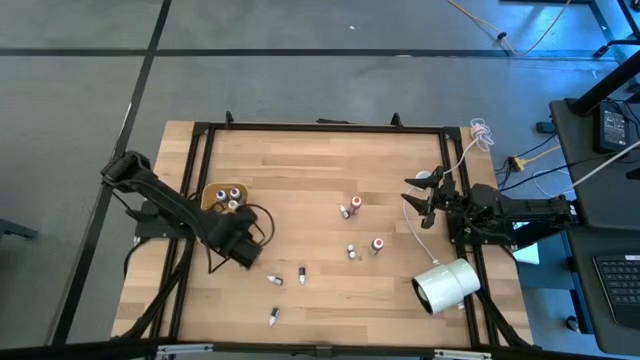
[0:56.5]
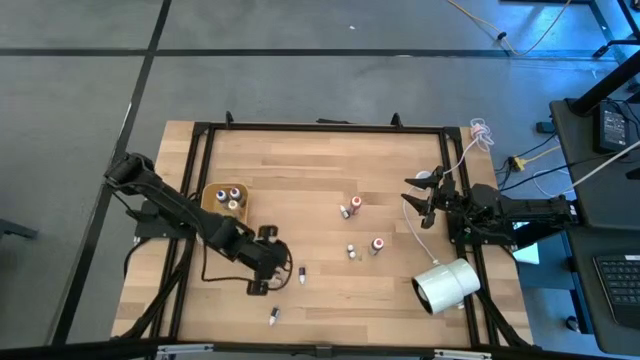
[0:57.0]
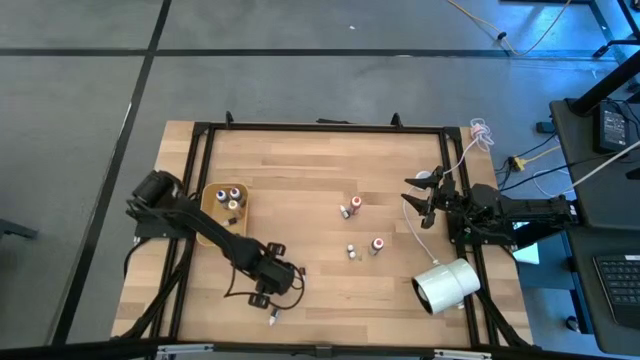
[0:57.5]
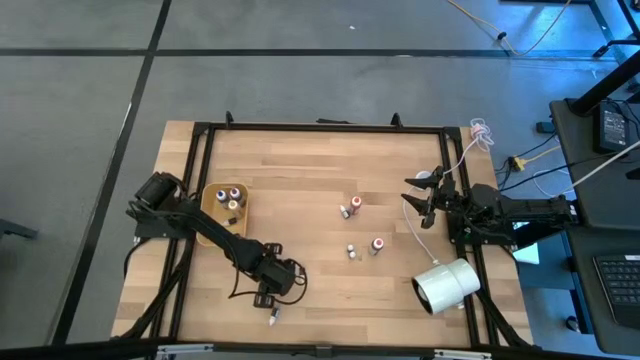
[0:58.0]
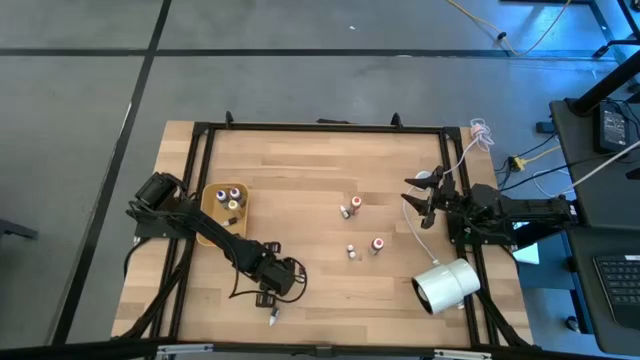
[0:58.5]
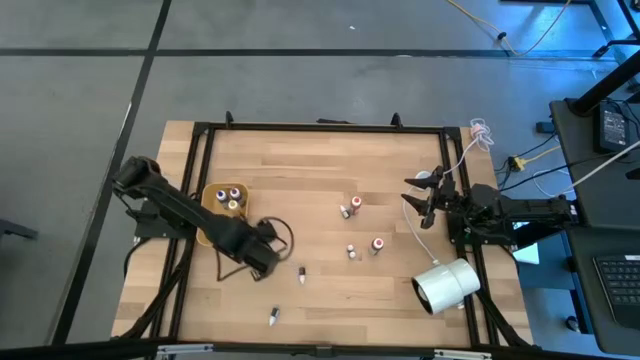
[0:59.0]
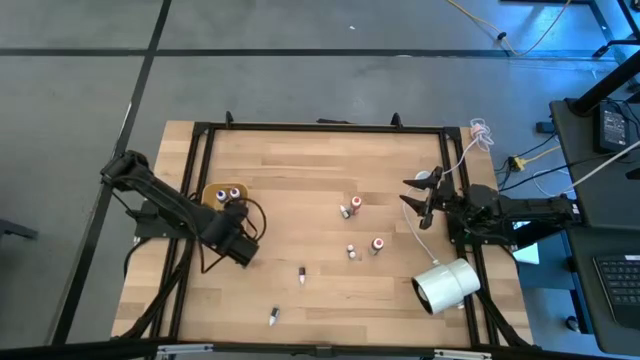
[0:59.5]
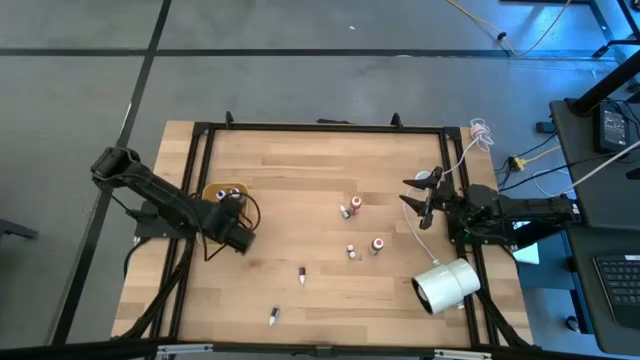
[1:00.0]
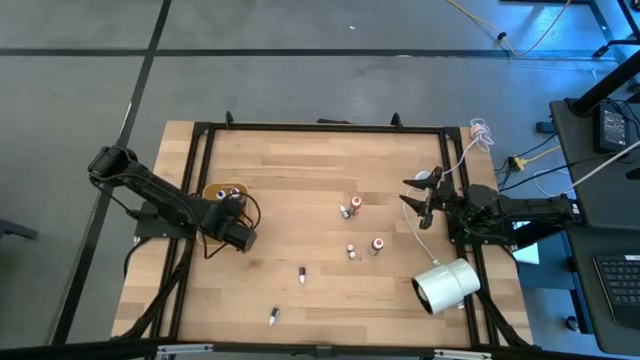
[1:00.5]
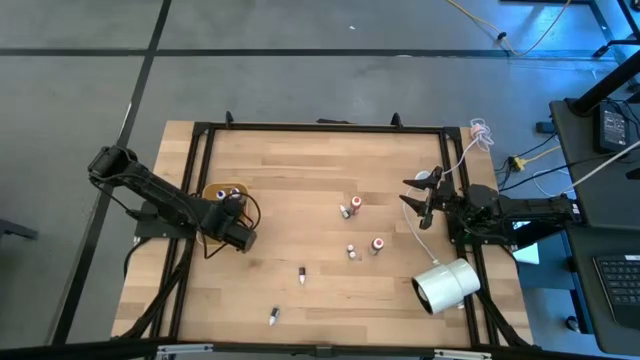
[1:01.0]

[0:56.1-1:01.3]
Task: Pick & Place food coloring
Put the small black food coloring bottle into the yellow bin

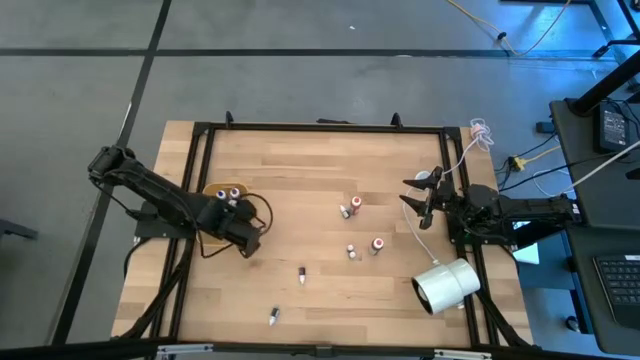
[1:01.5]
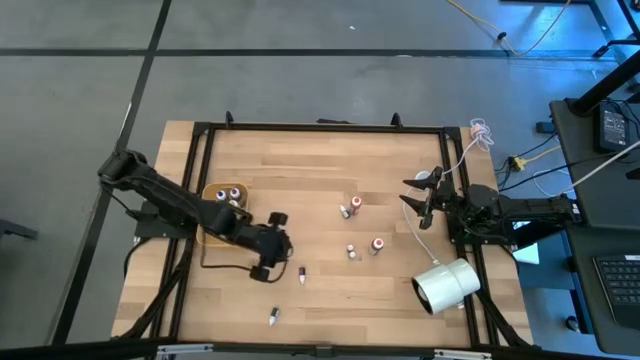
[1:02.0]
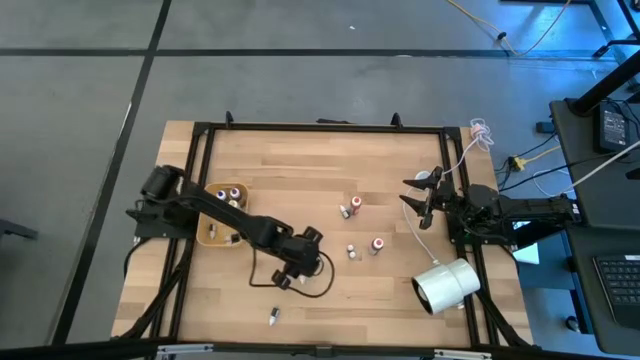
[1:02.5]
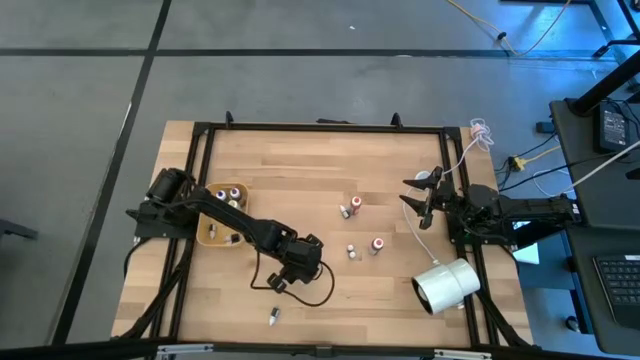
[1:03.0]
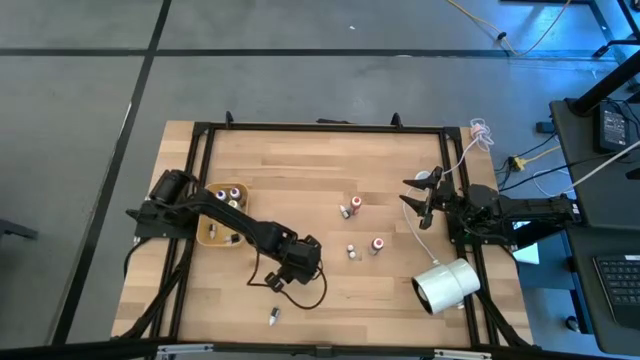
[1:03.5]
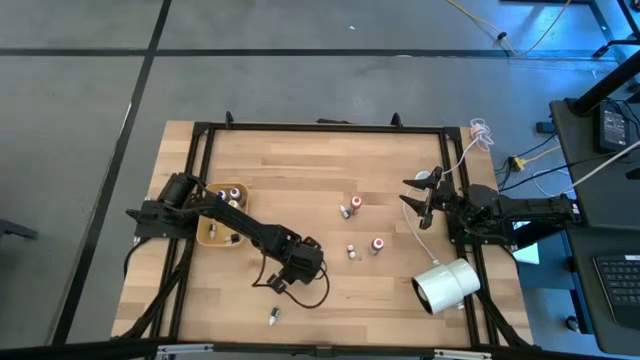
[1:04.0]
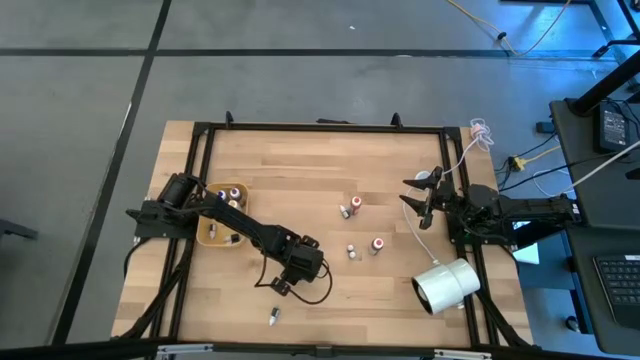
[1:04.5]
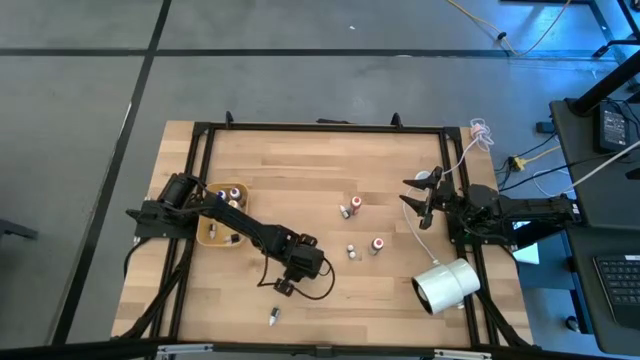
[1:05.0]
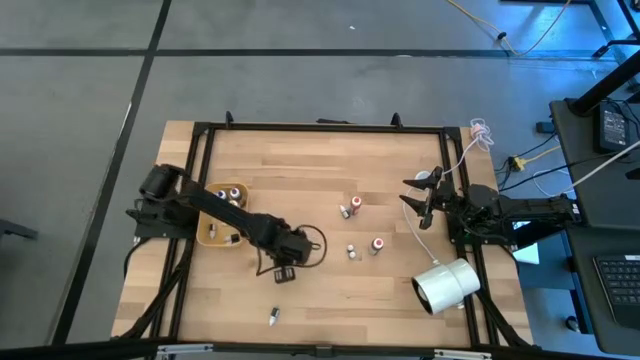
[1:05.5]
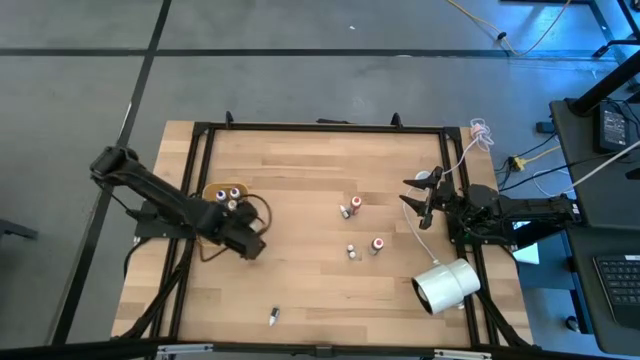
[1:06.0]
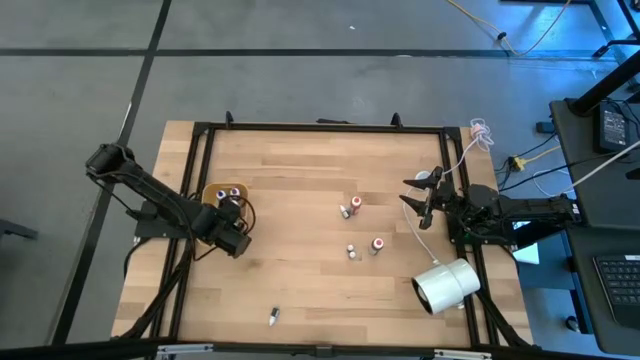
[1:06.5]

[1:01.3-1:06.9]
Put the small purple food coloring bottle into the yellow bin

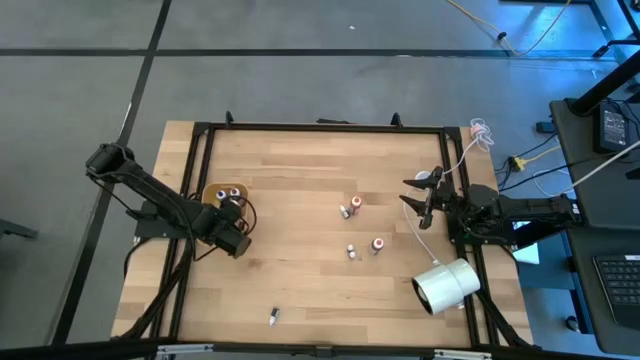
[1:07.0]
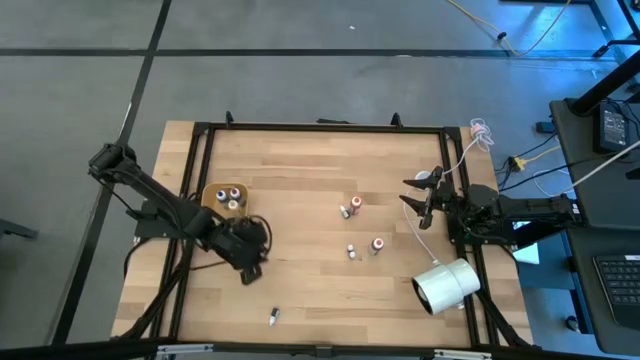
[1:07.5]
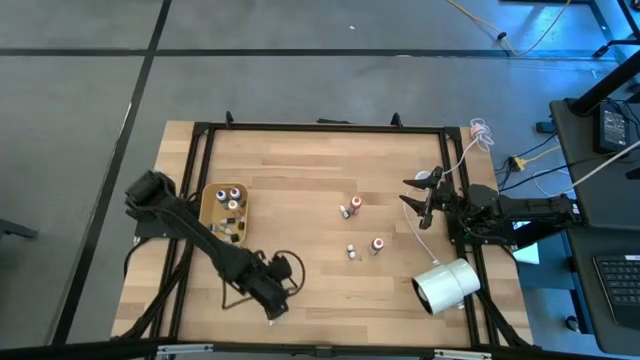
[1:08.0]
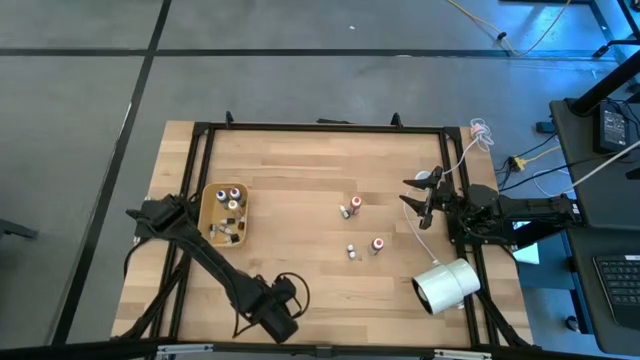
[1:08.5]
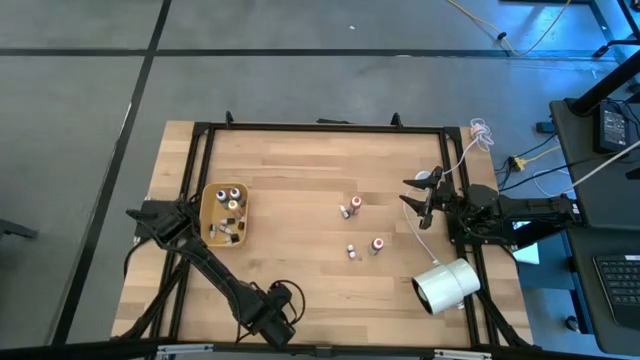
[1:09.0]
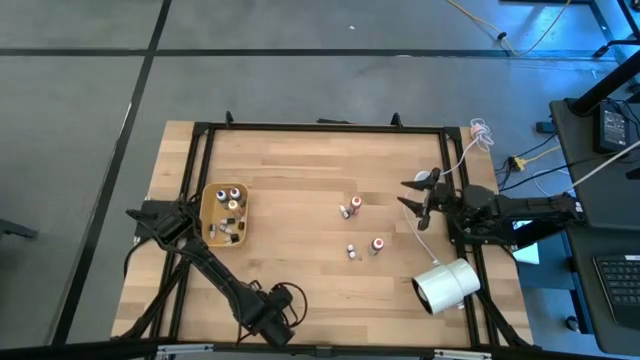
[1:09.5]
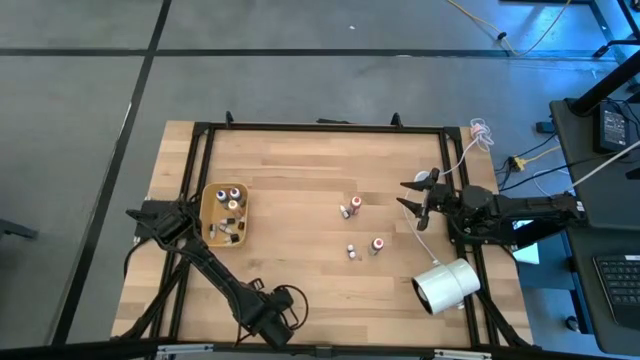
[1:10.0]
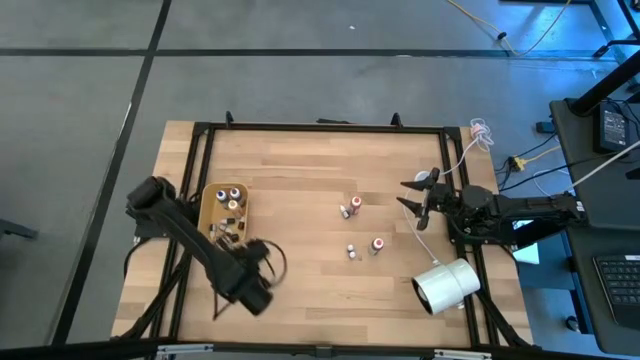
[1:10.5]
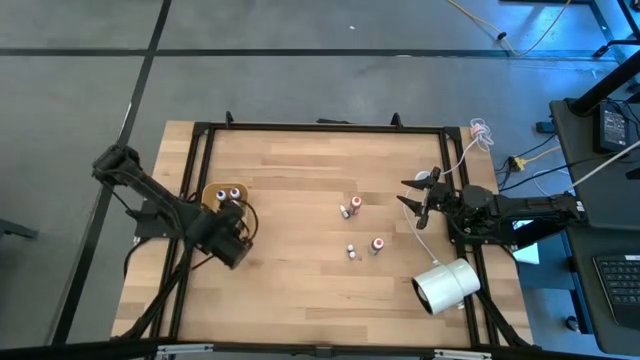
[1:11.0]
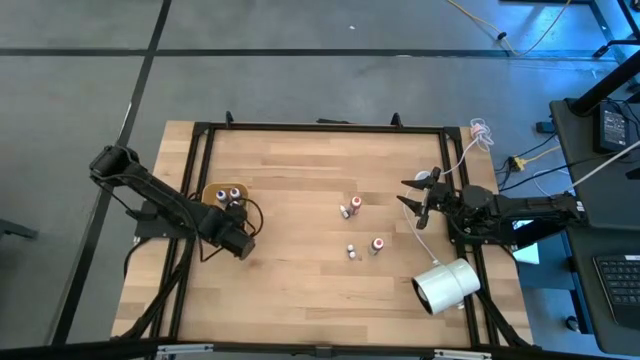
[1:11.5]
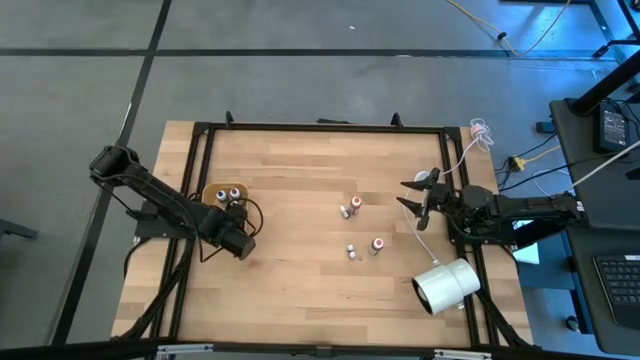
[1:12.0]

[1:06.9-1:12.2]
Put the small black food coloring bottle into the yellow bin

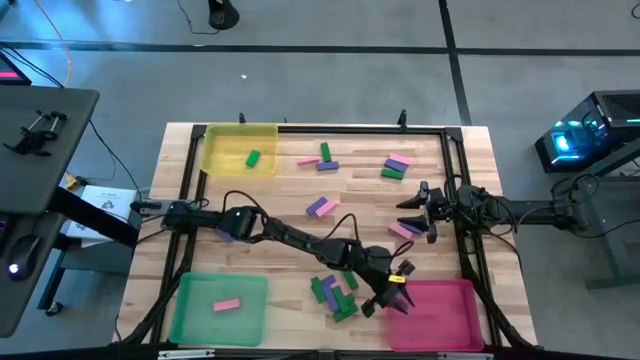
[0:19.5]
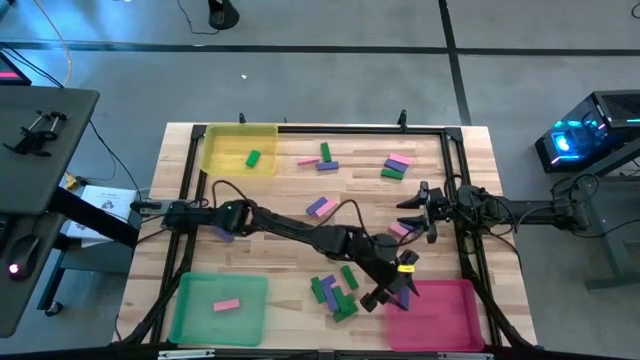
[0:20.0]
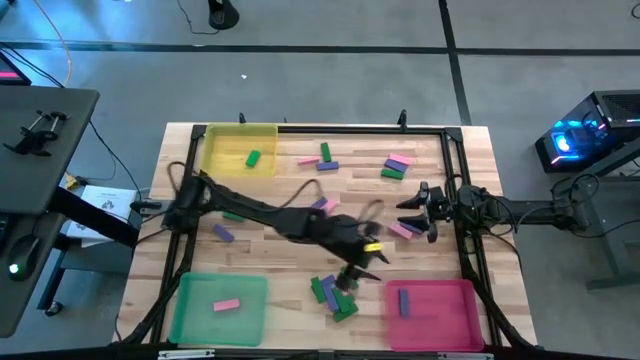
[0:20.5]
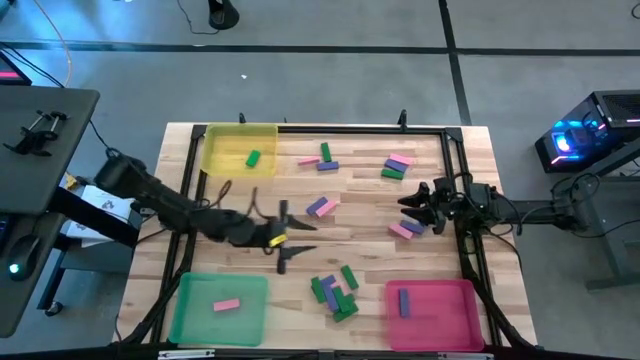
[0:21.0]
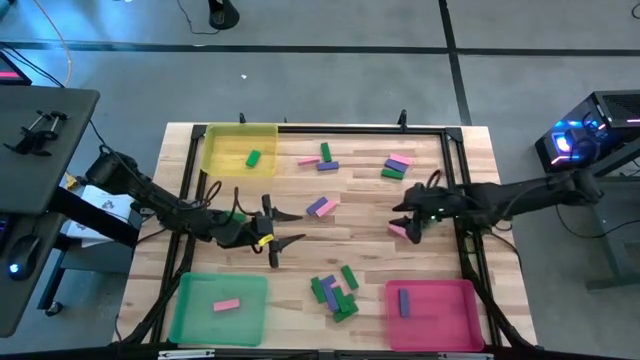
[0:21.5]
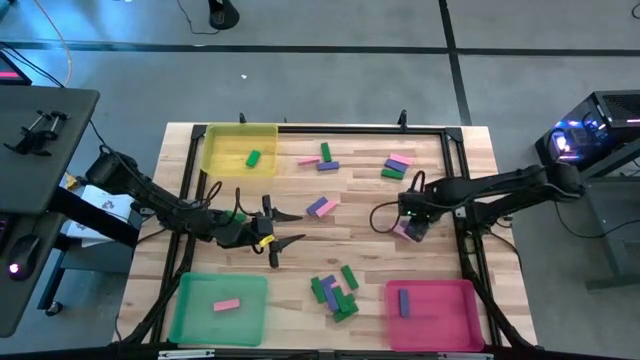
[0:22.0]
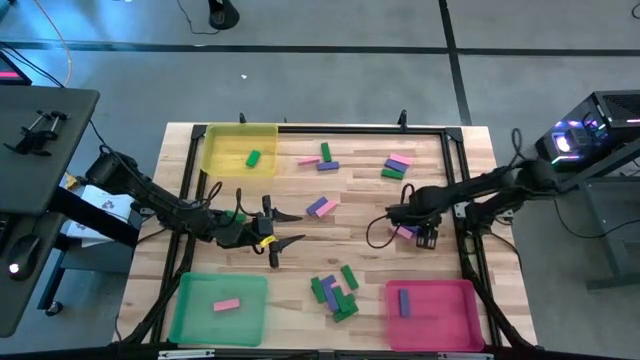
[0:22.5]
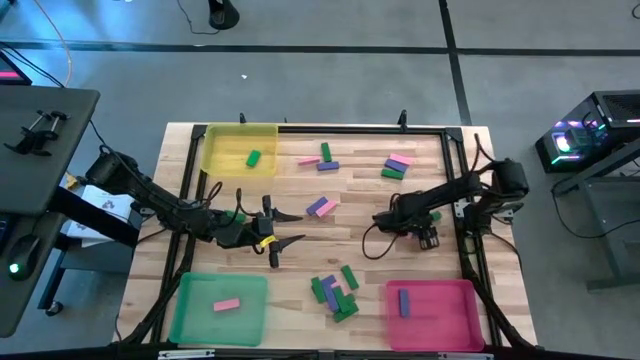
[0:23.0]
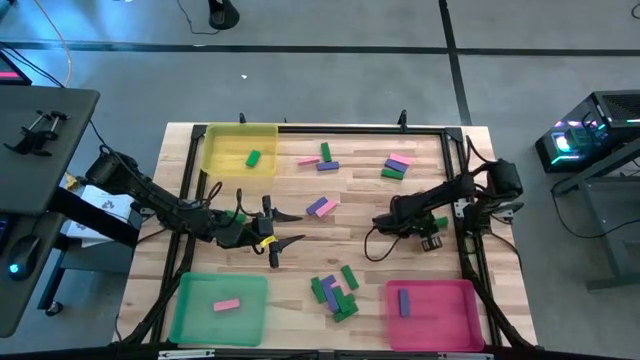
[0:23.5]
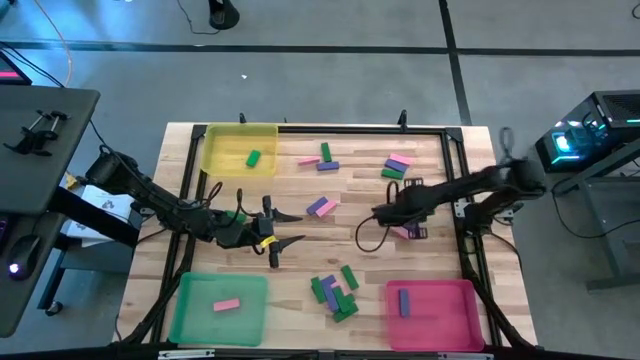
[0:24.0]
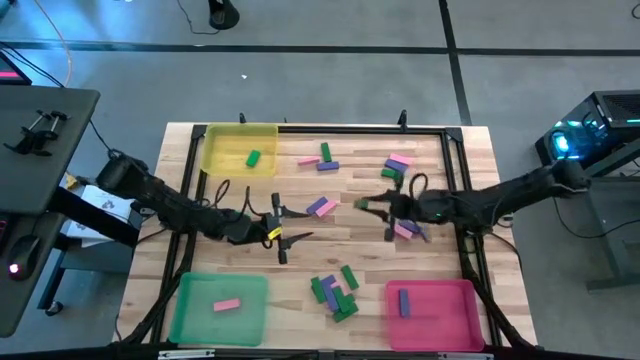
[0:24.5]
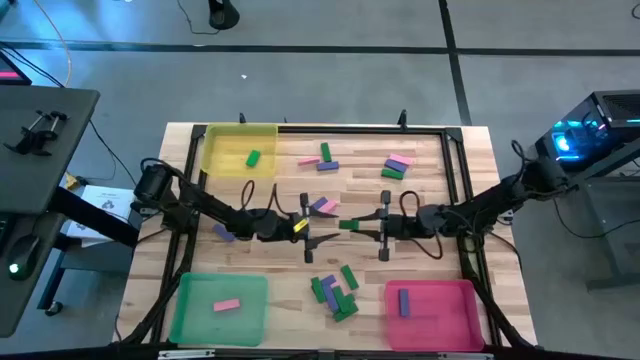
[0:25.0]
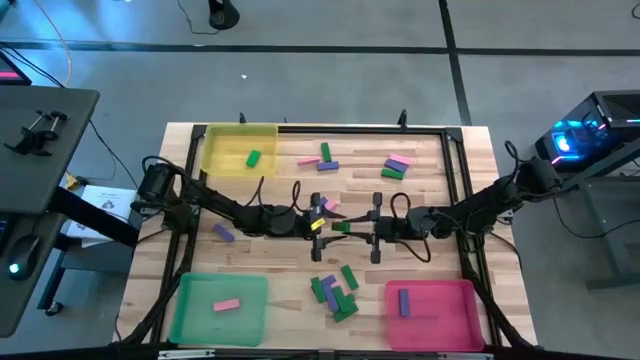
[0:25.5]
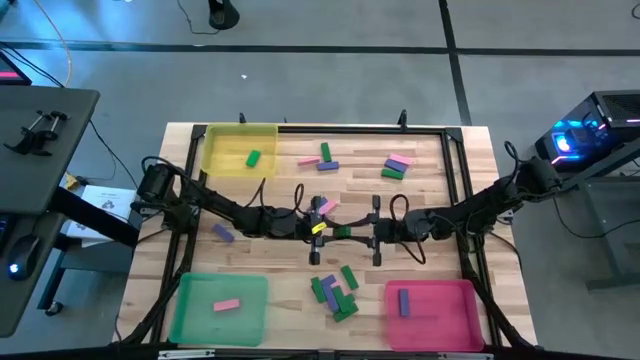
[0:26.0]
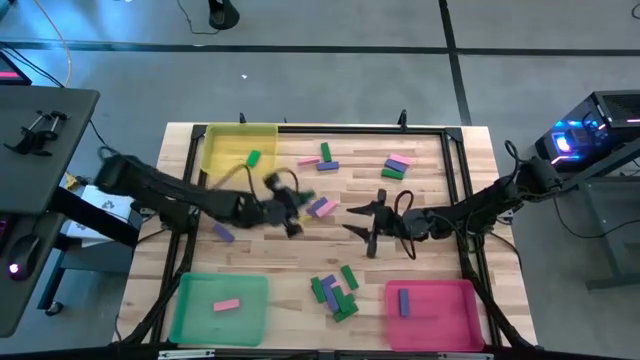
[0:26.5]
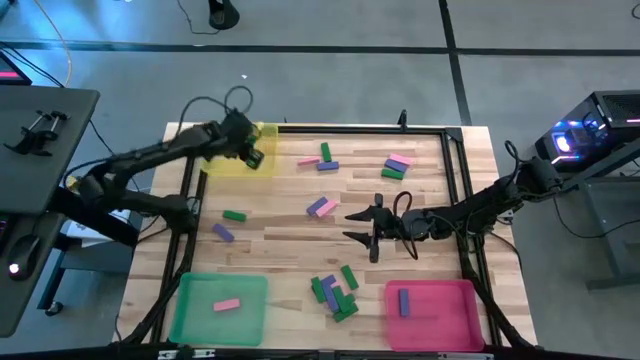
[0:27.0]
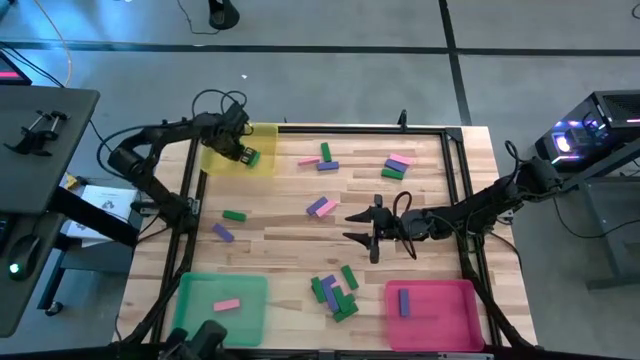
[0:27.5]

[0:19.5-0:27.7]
Task: Sort blocks
Put the green block into the yellow bin
